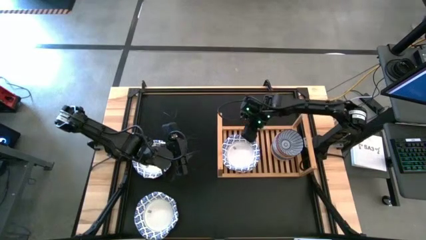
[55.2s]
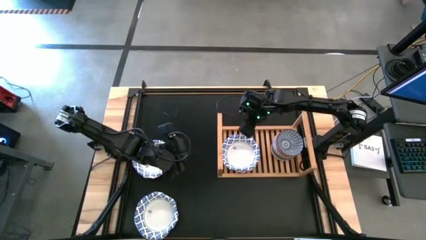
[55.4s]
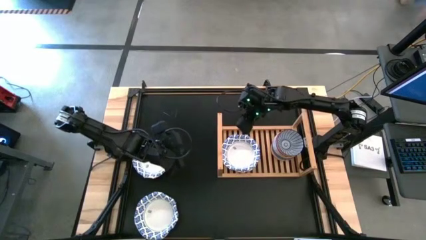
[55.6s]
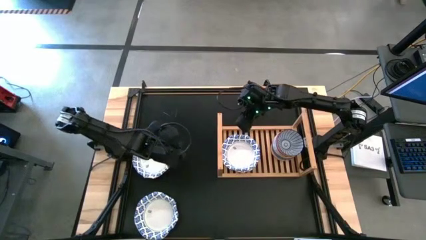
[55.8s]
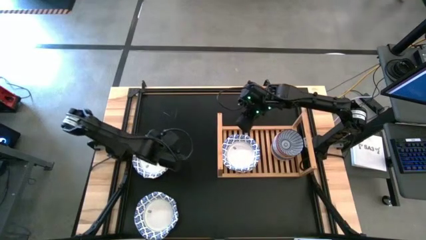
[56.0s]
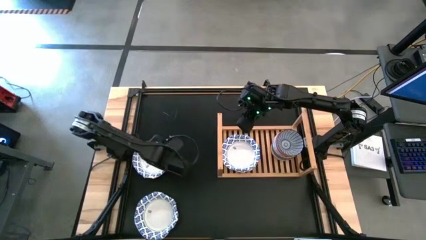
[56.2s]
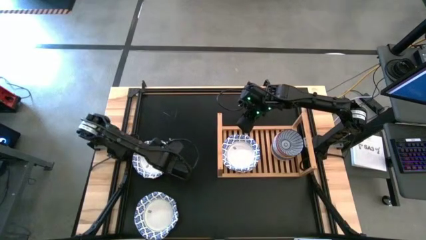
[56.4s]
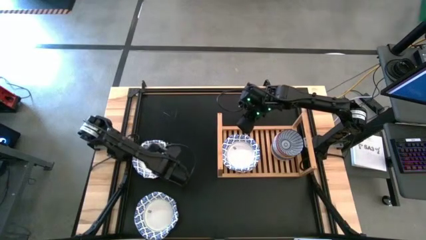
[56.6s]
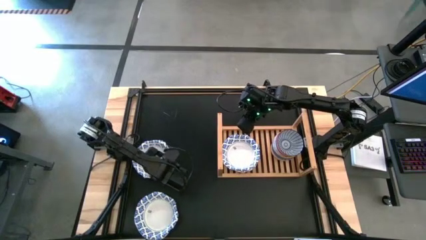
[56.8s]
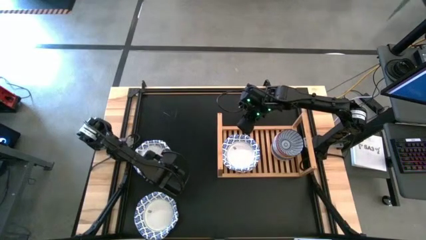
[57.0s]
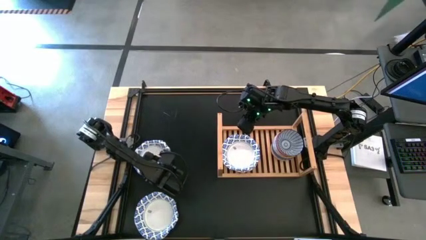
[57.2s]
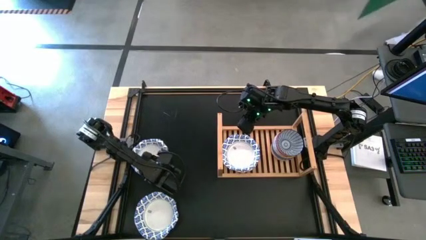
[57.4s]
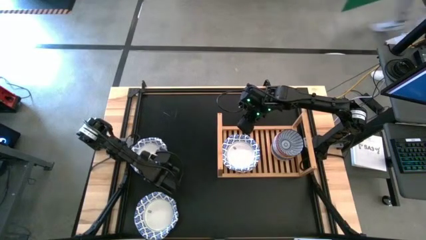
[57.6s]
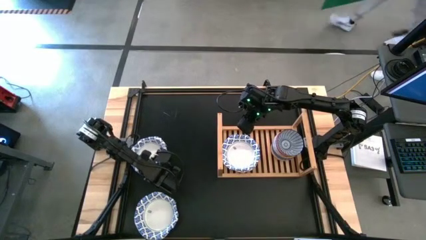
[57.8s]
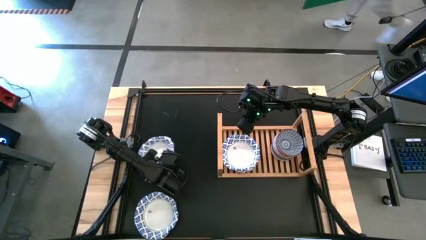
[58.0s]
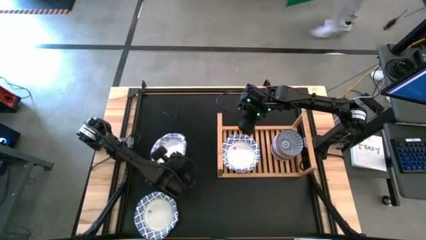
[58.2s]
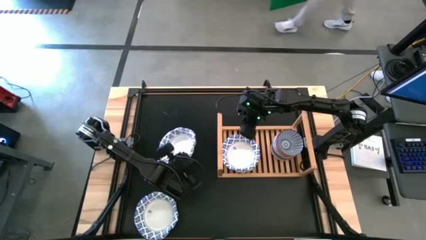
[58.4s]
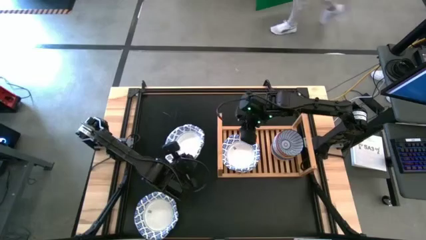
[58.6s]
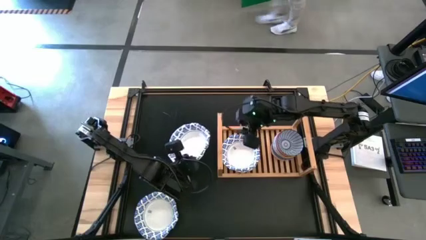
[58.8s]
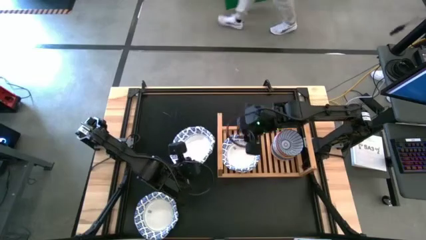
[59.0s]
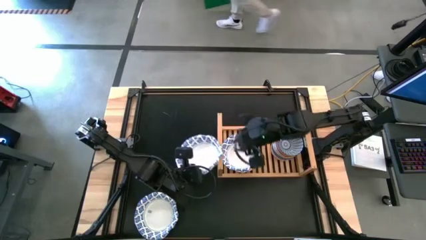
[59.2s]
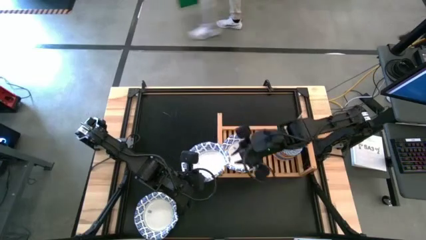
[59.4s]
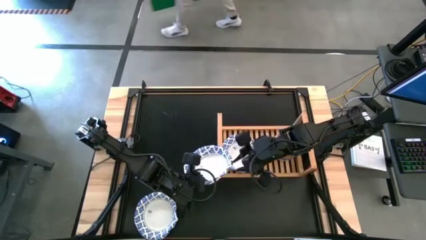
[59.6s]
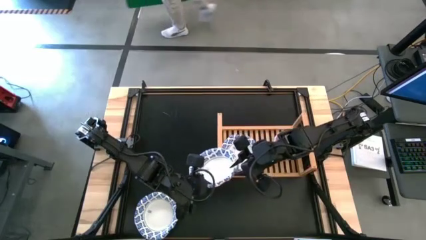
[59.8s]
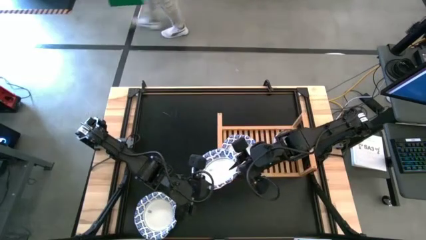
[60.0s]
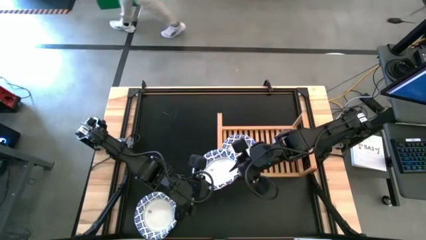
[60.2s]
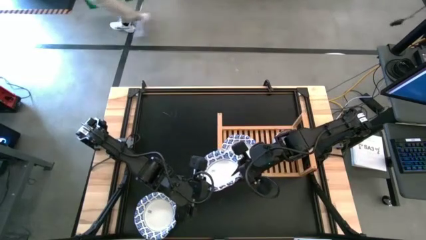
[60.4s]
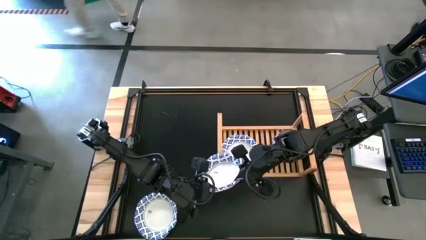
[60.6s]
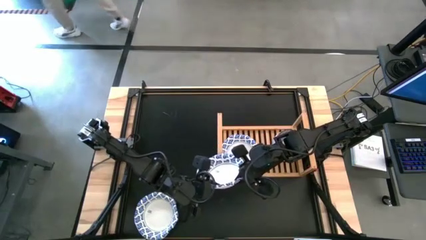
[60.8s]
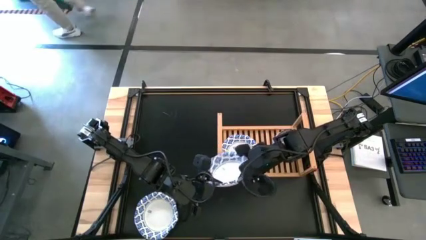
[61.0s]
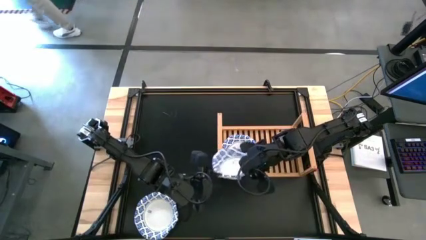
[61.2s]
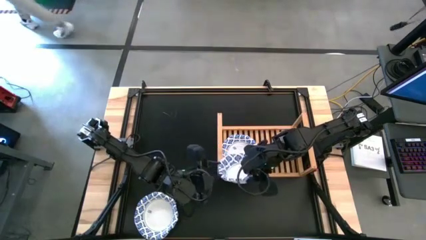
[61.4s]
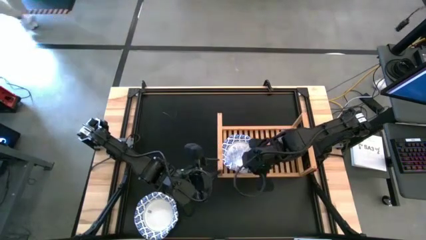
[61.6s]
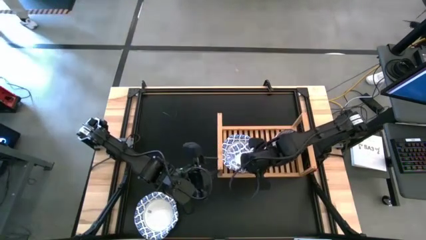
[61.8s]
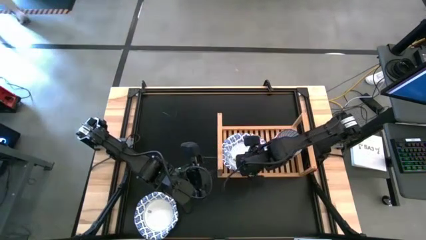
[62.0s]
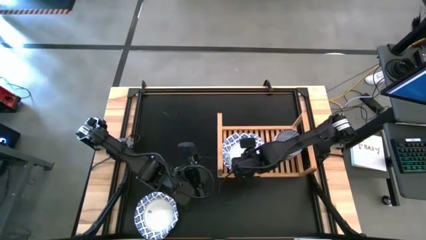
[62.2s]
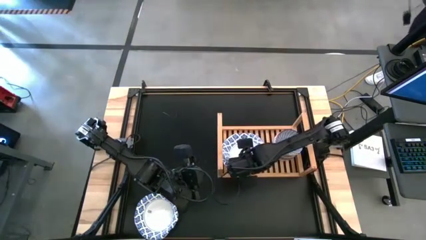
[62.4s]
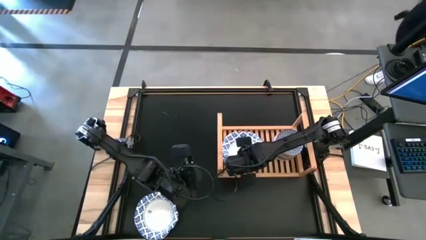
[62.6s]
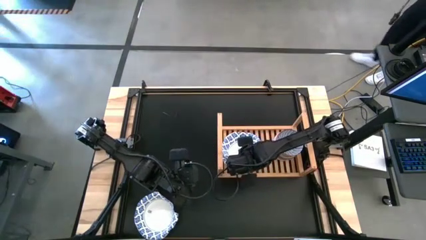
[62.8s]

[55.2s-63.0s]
Task: Place and stack bowls onto a shelf
Stack the top white bowl on top of the white bowl on the shelf

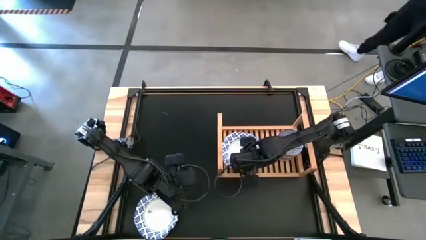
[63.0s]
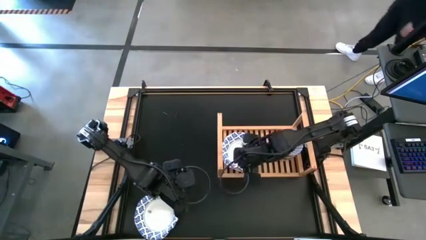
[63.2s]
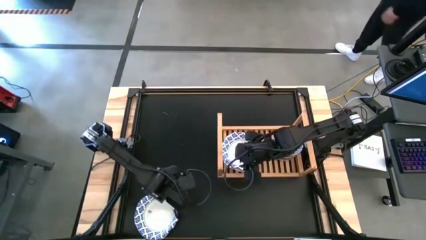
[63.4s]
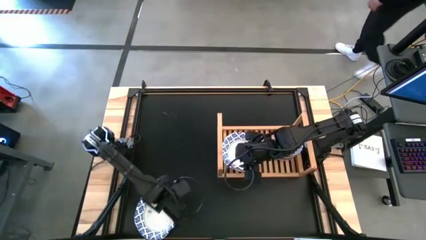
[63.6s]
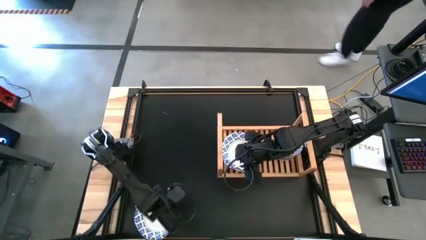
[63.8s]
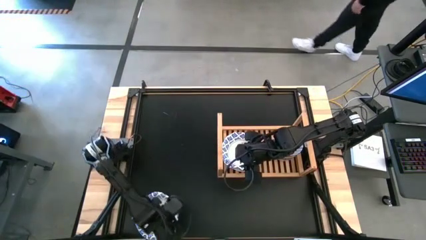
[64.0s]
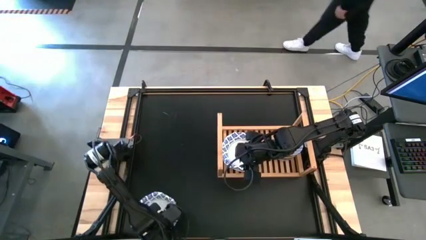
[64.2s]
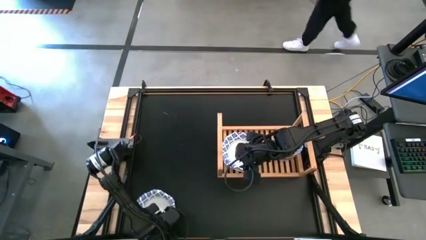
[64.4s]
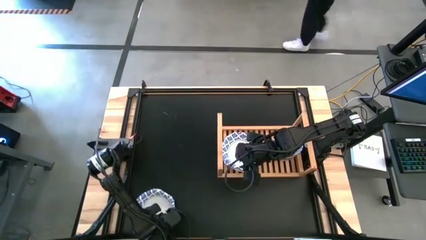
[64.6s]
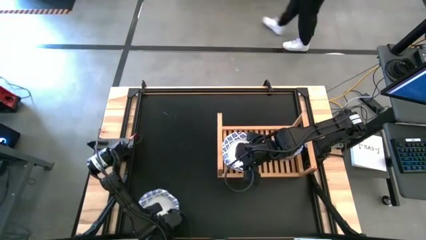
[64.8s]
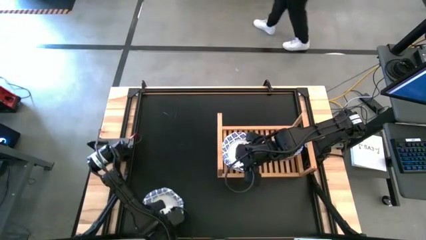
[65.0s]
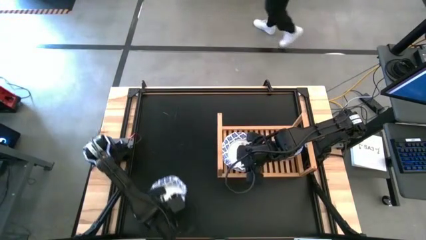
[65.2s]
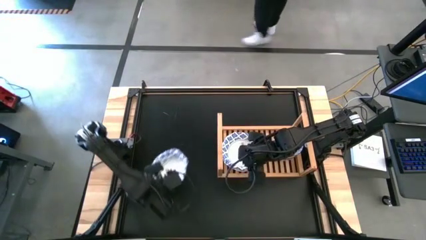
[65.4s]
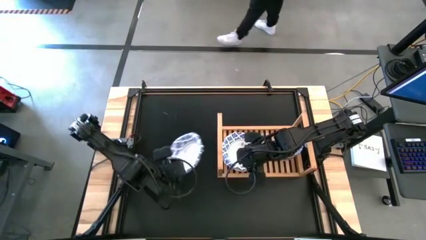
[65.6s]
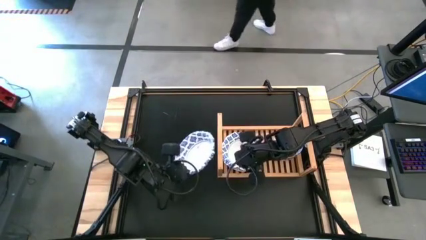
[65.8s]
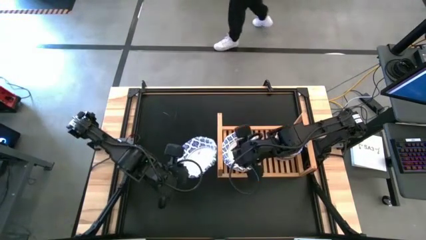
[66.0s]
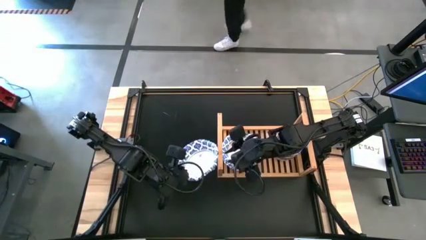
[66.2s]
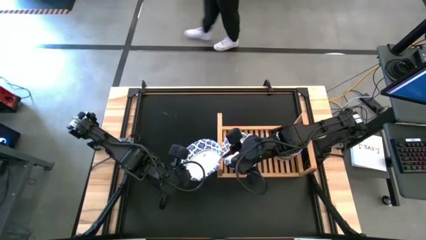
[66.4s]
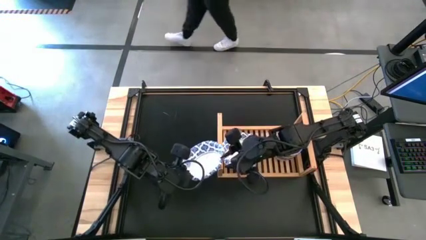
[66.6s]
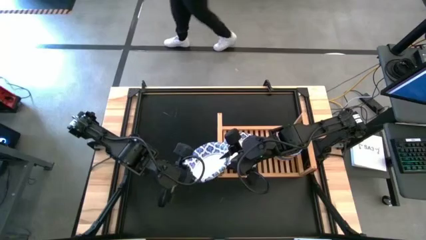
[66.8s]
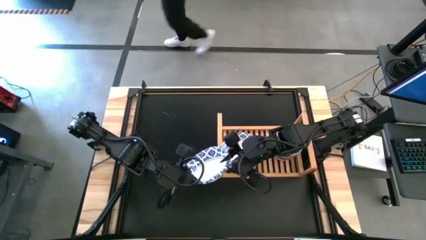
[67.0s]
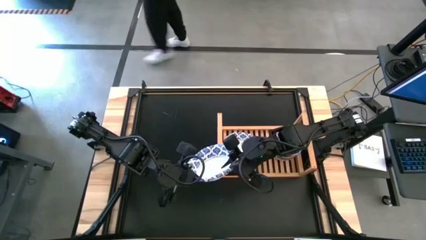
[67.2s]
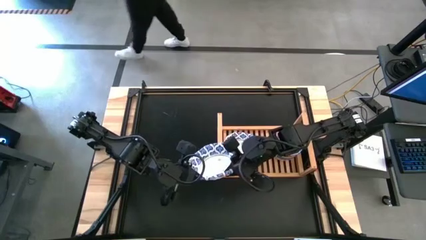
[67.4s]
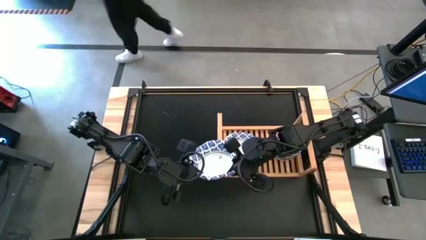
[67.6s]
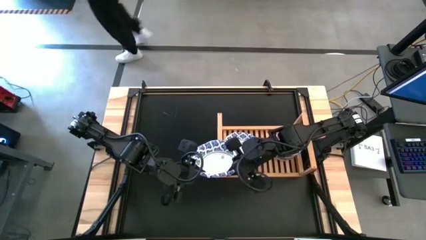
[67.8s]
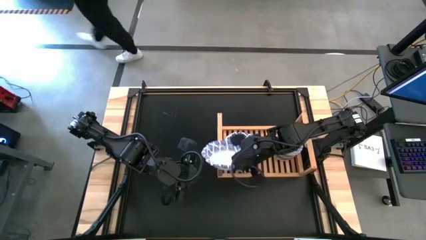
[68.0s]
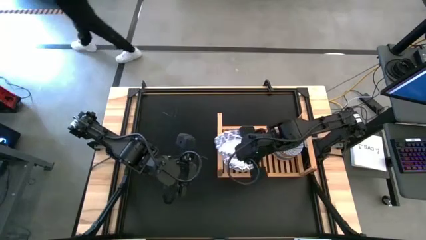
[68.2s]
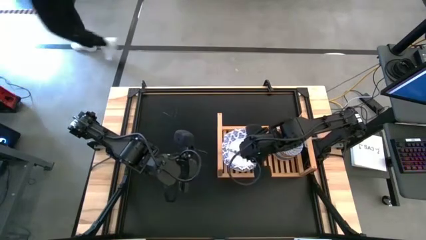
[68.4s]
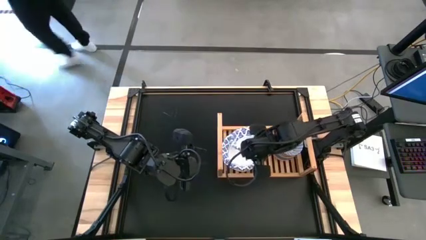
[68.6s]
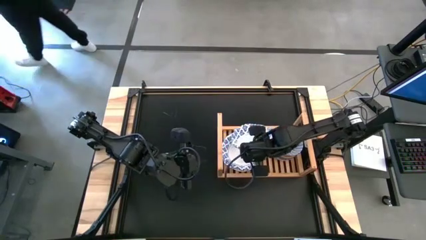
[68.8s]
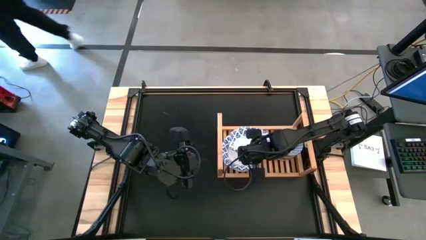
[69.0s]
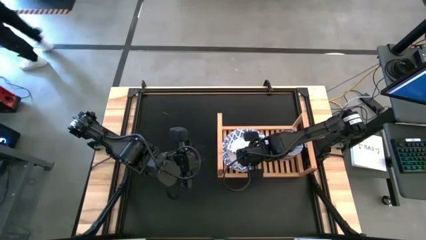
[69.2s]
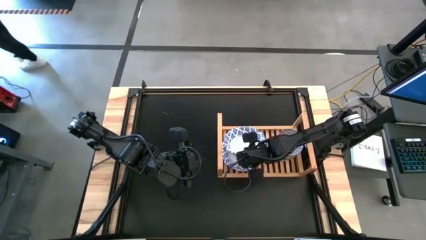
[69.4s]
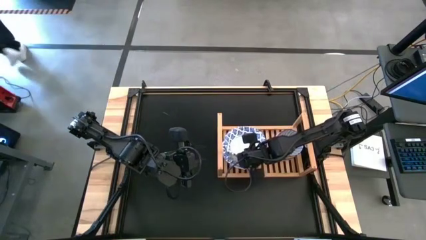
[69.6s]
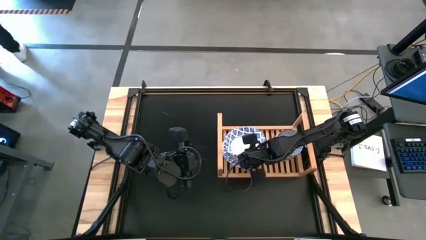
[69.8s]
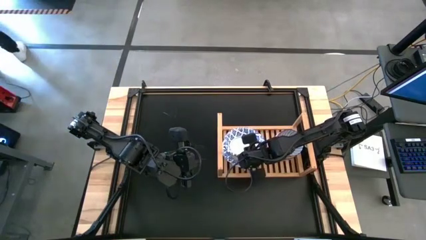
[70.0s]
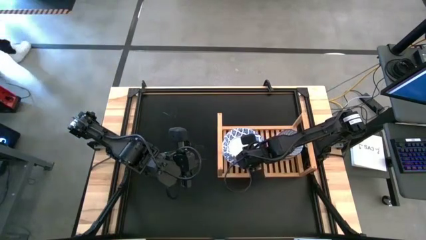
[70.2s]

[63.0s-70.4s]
Stack the white bowl on top of the white bowl on the shelf

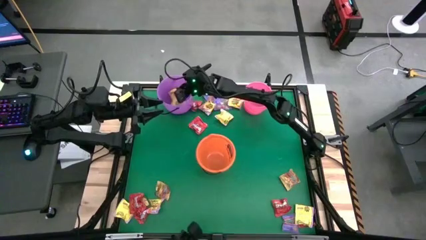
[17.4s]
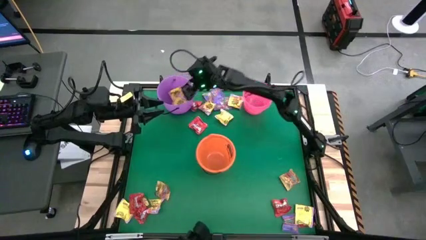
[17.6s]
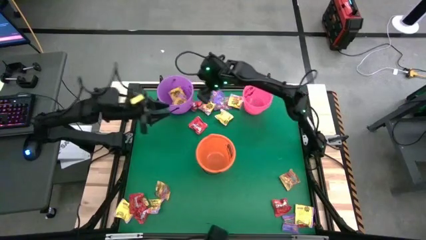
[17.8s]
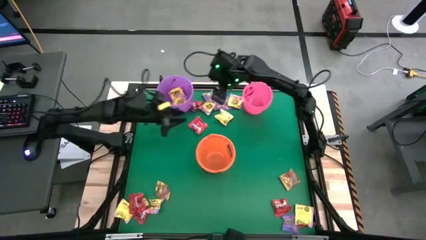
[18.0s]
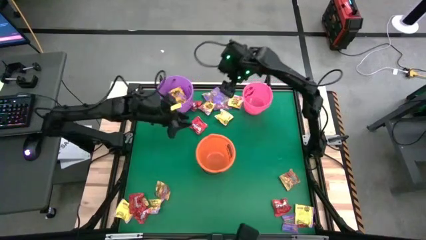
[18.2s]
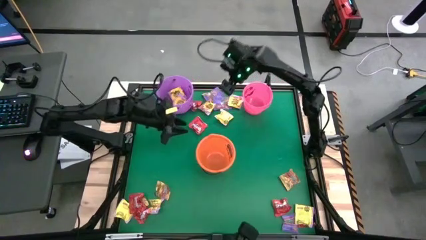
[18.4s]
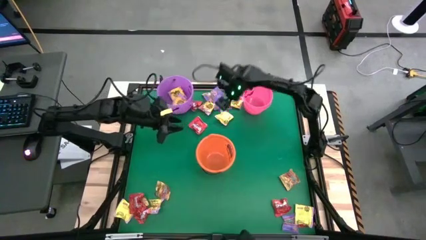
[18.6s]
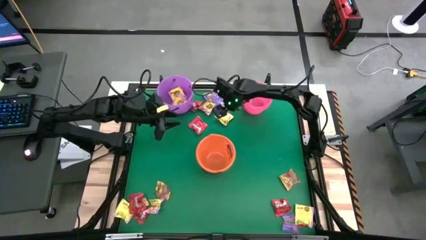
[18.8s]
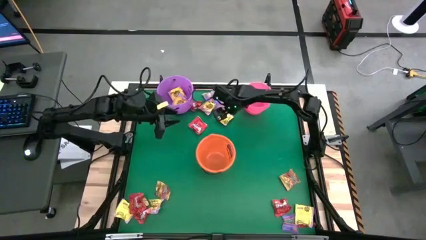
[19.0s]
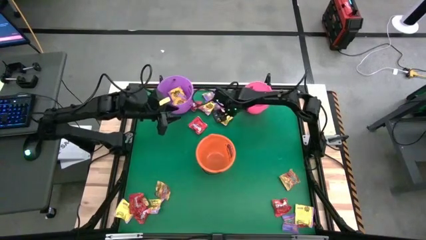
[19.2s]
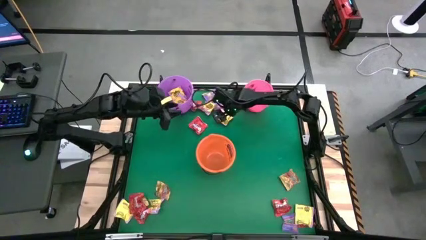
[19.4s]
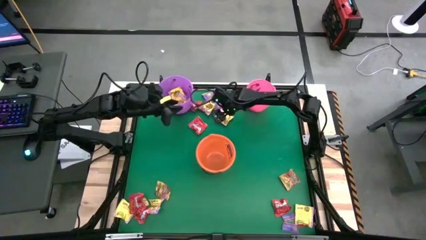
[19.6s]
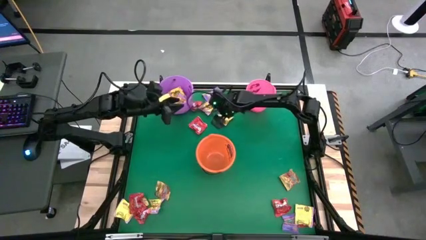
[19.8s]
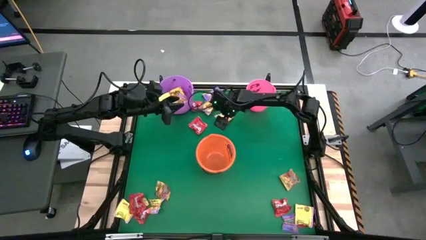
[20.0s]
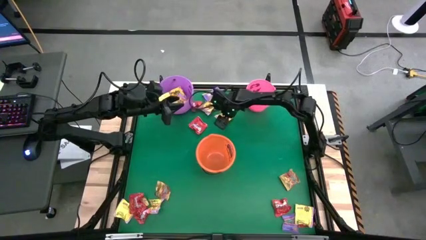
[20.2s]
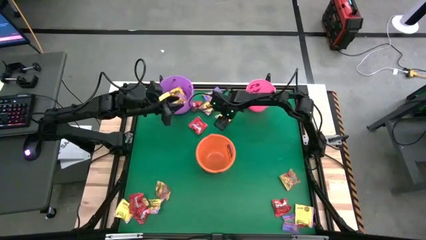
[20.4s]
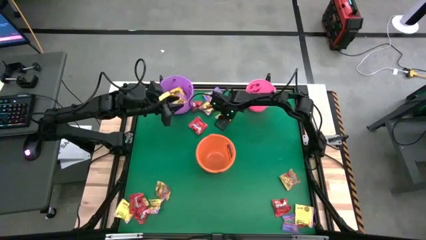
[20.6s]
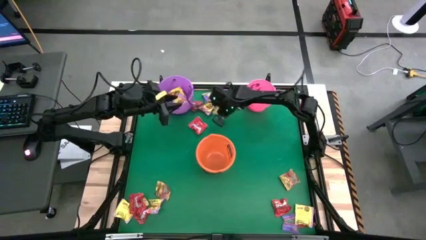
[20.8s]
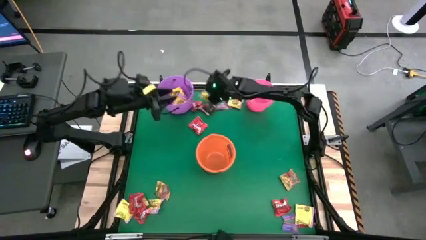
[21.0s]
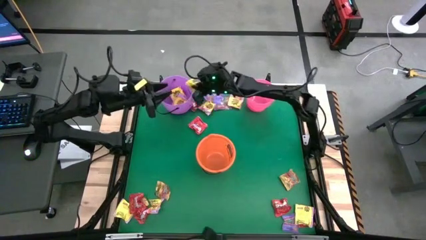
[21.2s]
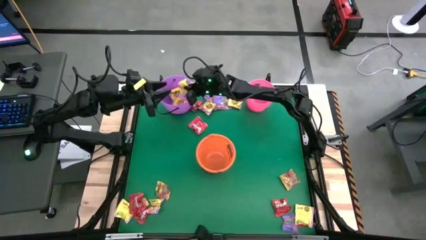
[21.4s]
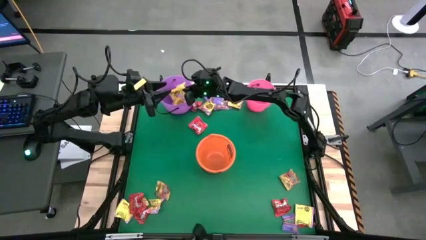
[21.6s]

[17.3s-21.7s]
Task: Sort candy by brand, put in halloween buckets
Put the yellow candy into the light violet bucket
